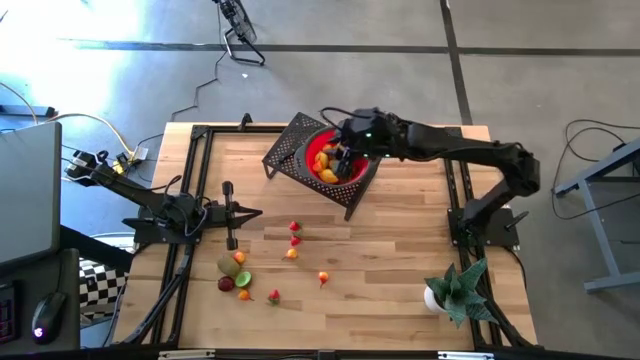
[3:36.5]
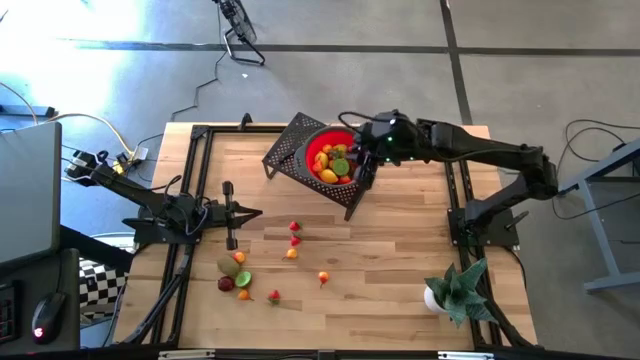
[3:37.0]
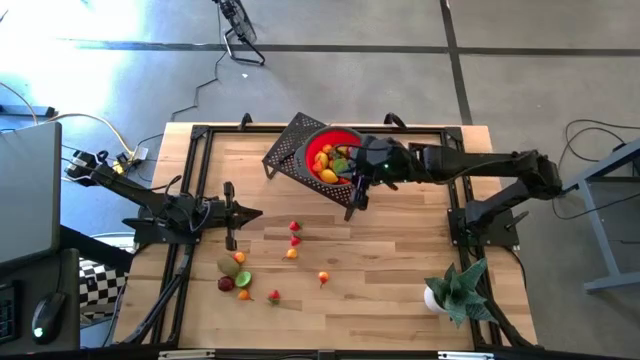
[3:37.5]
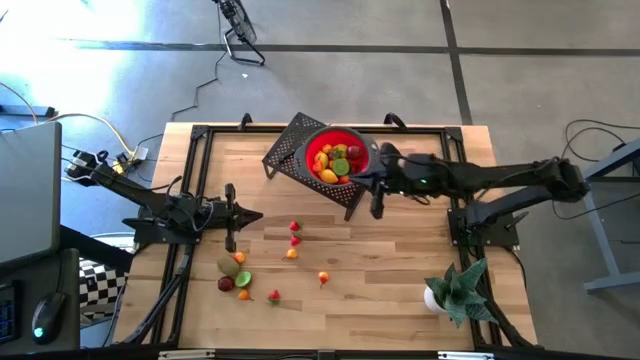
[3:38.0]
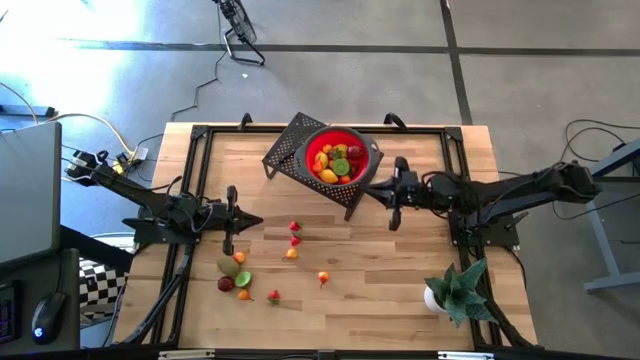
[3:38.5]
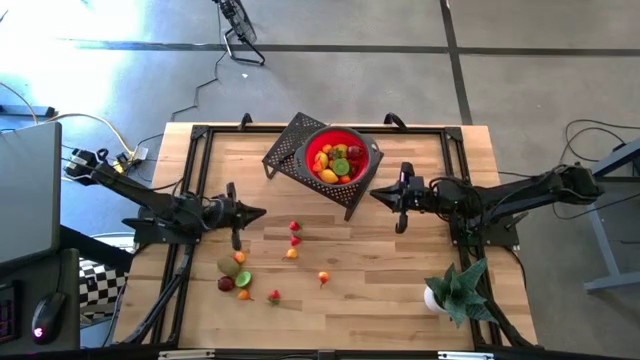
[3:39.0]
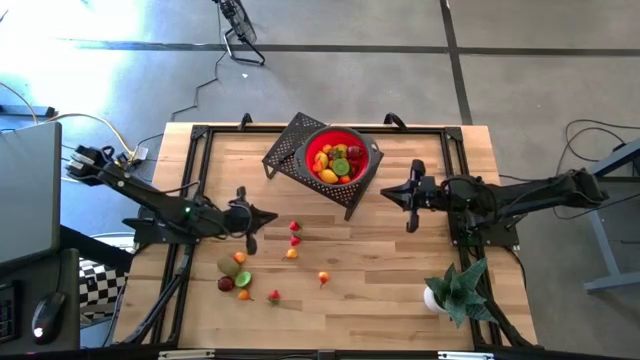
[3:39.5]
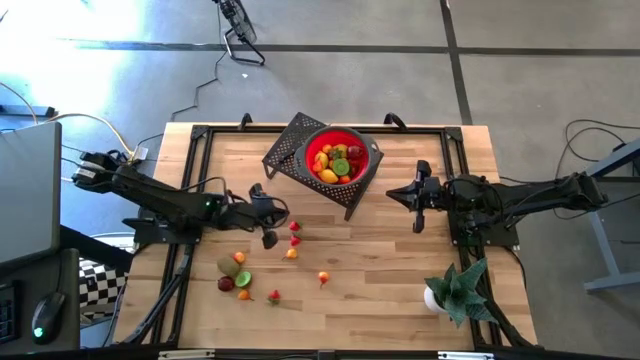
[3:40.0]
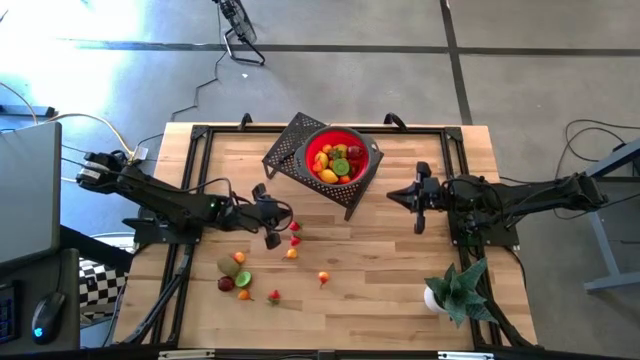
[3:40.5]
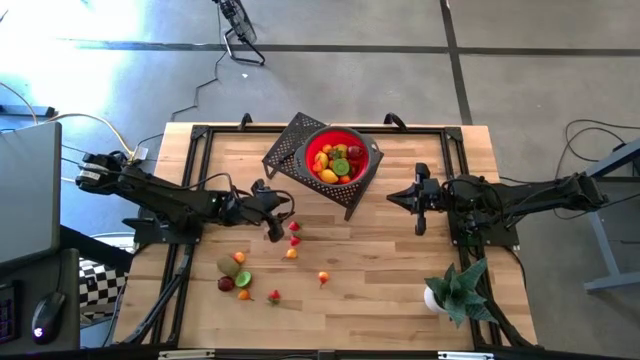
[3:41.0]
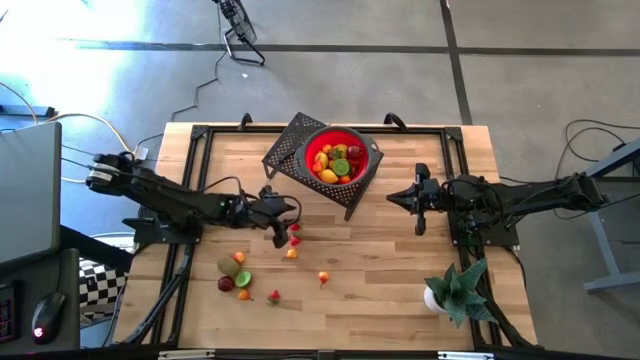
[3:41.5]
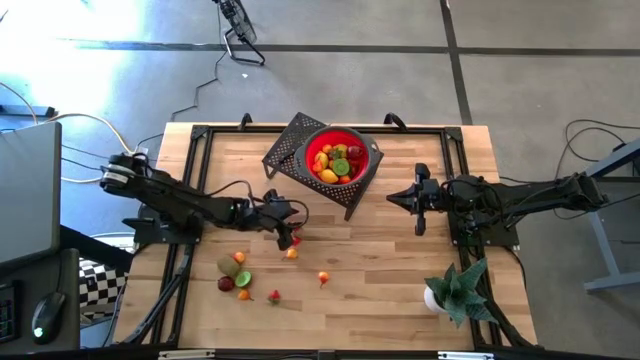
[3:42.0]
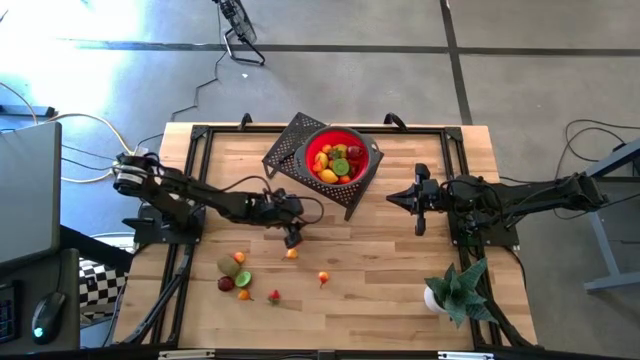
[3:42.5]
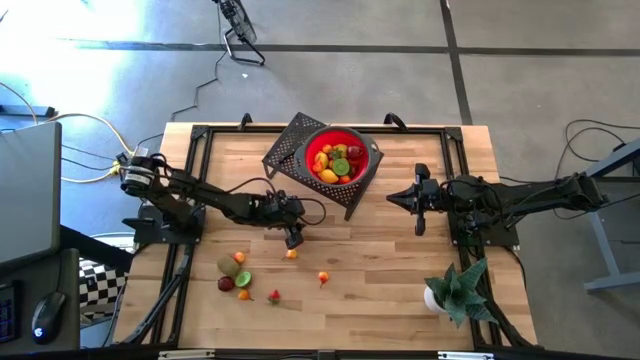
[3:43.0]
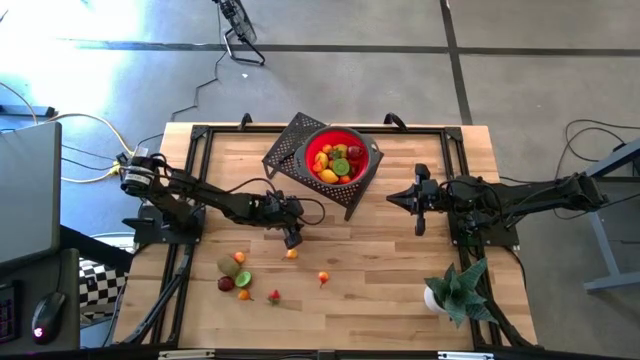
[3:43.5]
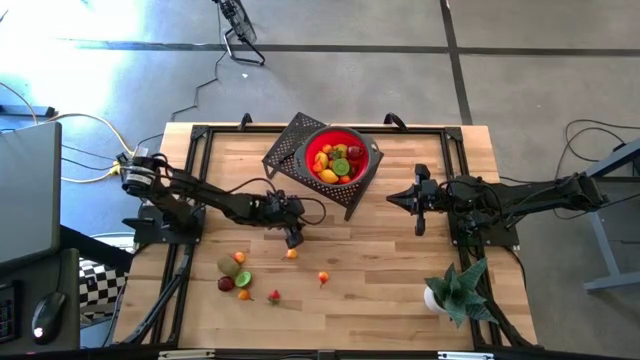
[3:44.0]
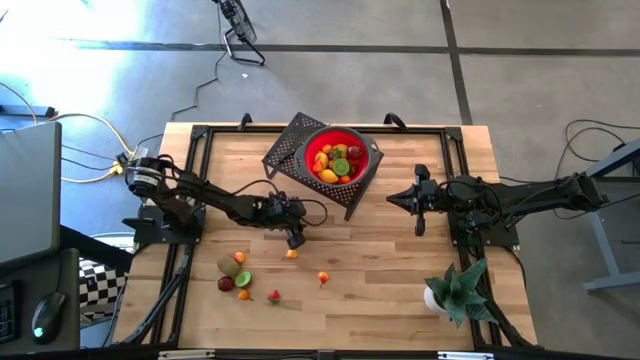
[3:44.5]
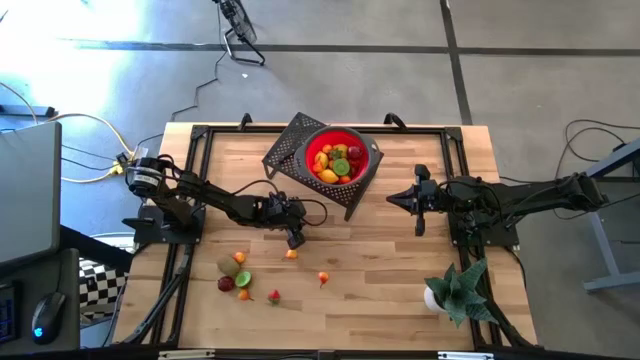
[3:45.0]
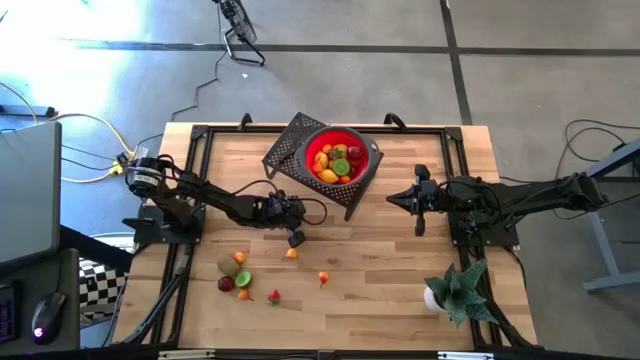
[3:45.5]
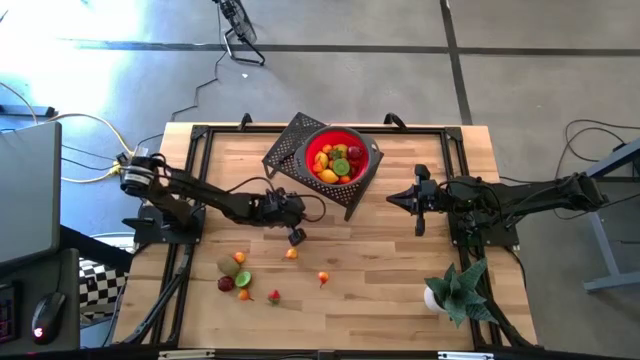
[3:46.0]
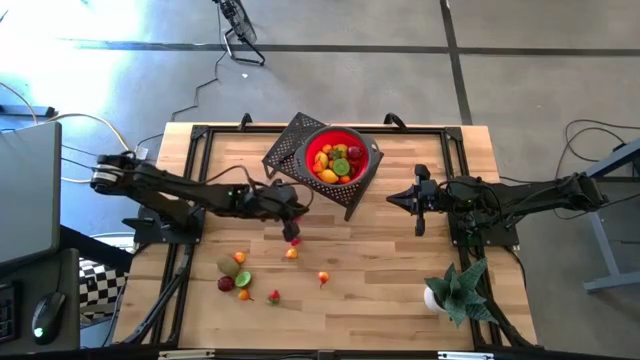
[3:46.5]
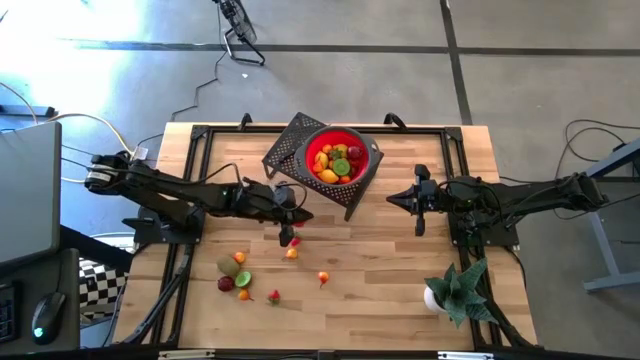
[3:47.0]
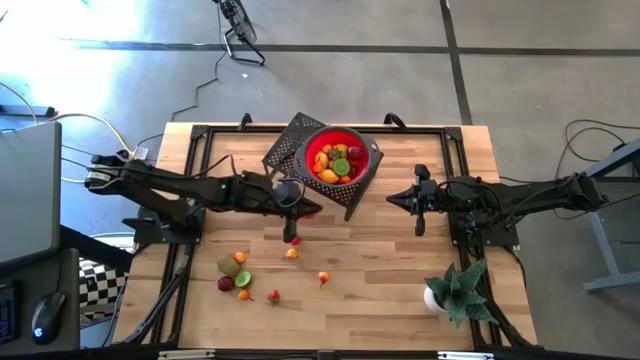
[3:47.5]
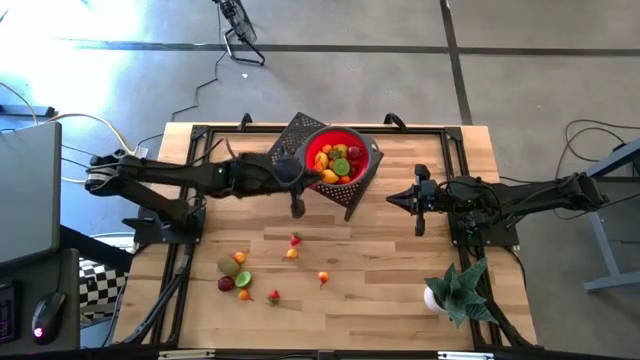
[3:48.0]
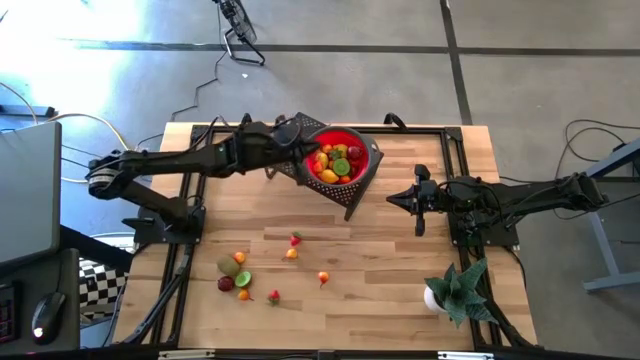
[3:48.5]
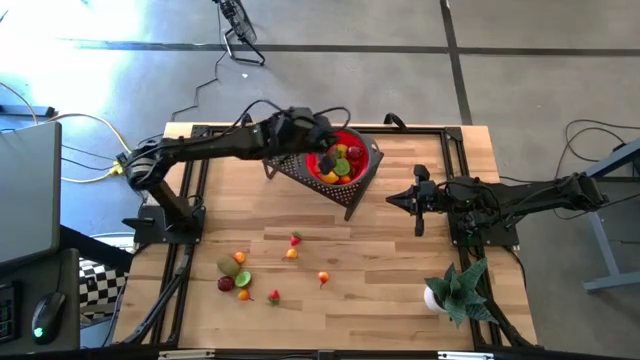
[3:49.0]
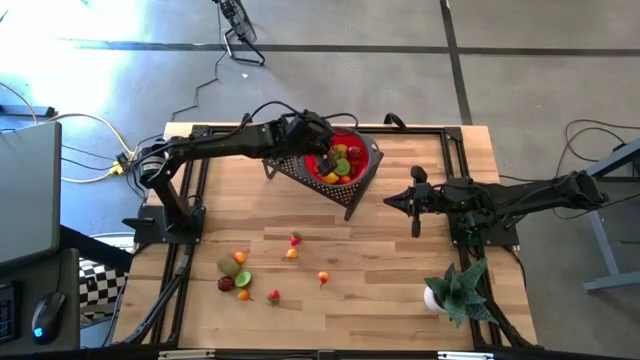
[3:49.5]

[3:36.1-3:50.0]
Task: Pick & Place Fruit
Put the strawberry into the strainer bowl on the shelf

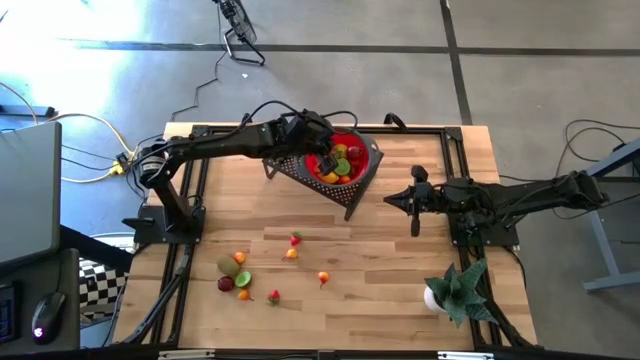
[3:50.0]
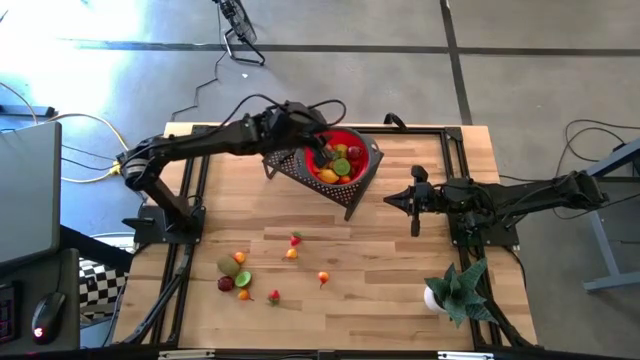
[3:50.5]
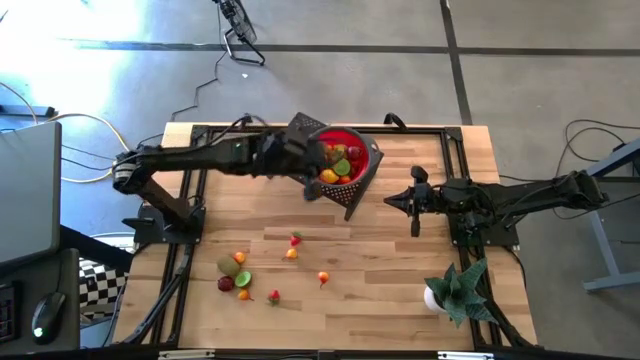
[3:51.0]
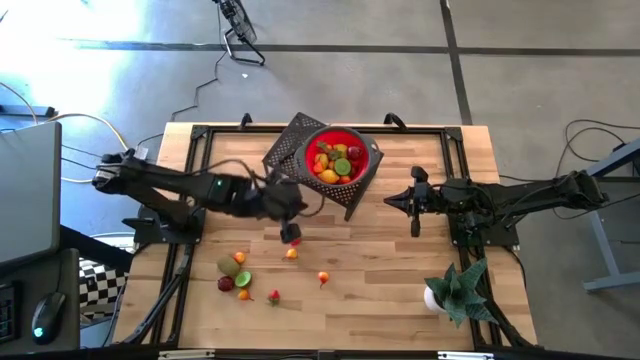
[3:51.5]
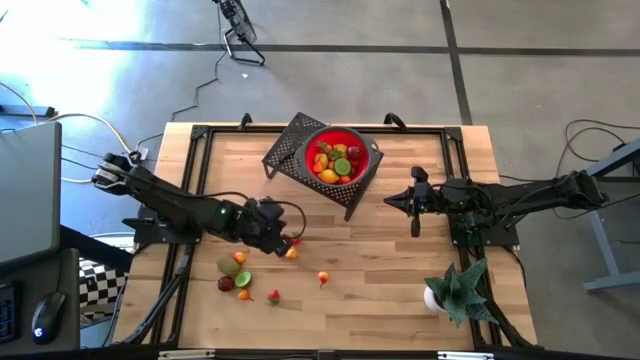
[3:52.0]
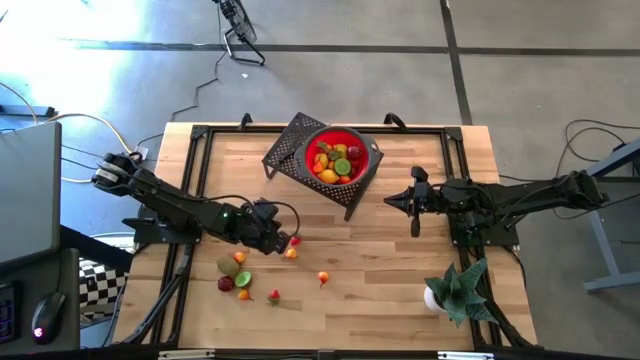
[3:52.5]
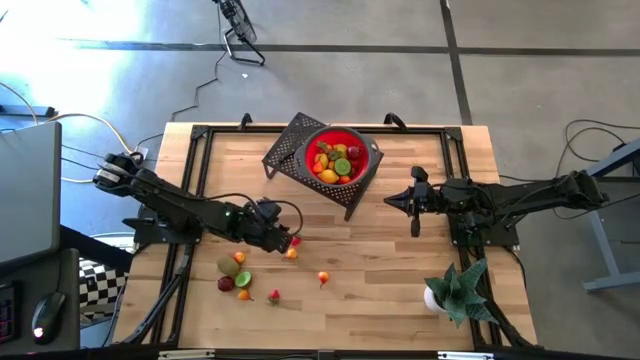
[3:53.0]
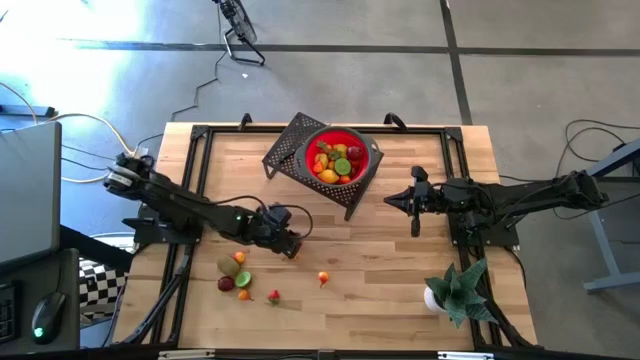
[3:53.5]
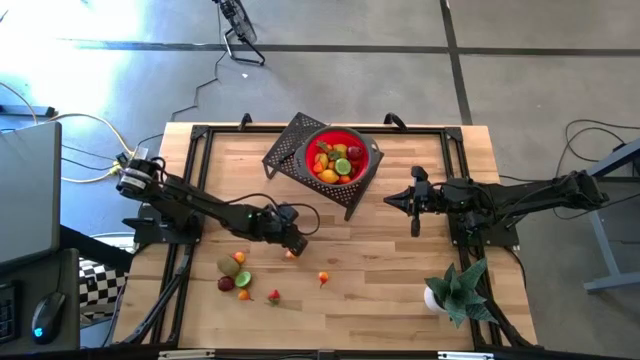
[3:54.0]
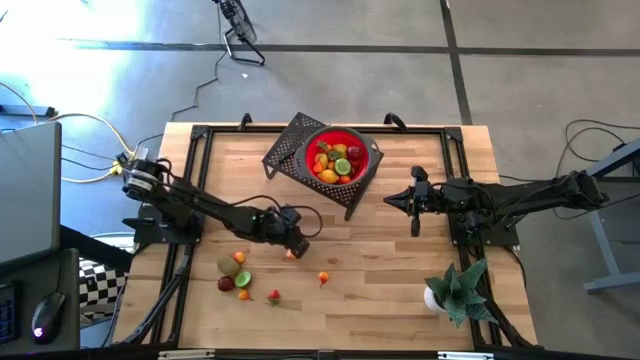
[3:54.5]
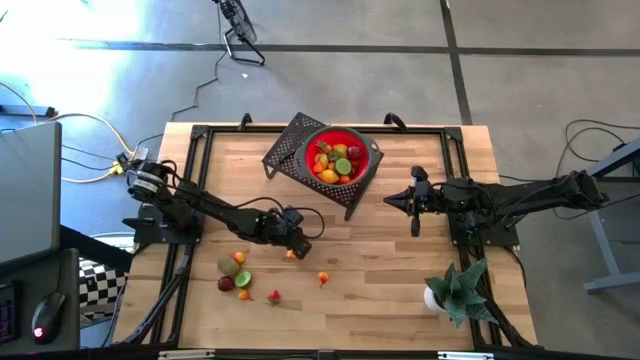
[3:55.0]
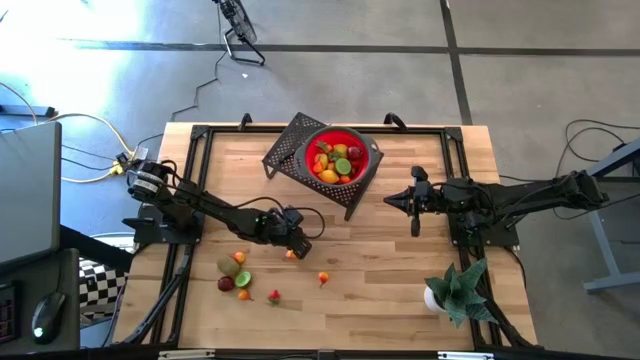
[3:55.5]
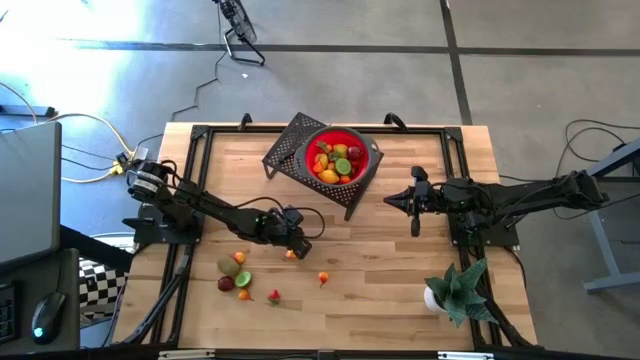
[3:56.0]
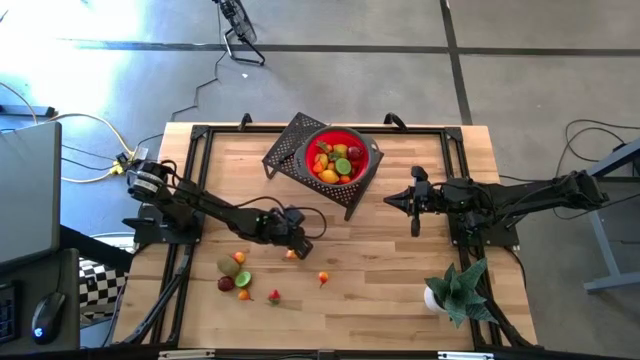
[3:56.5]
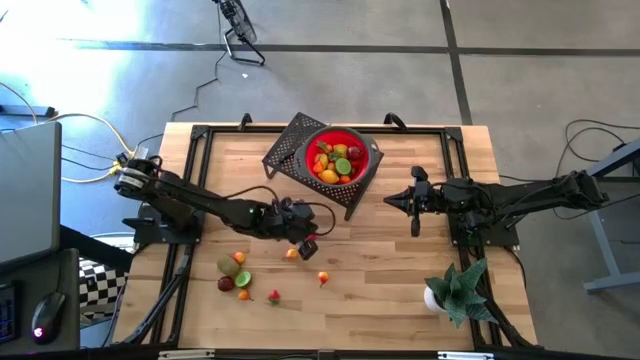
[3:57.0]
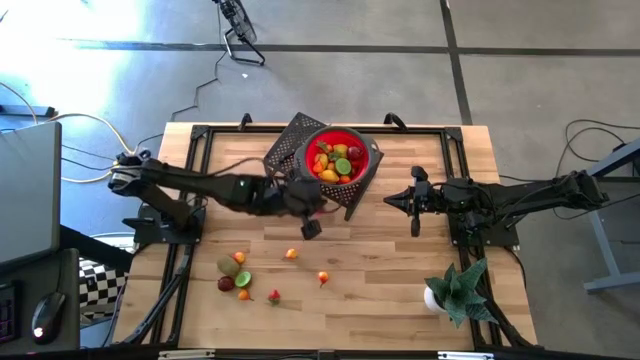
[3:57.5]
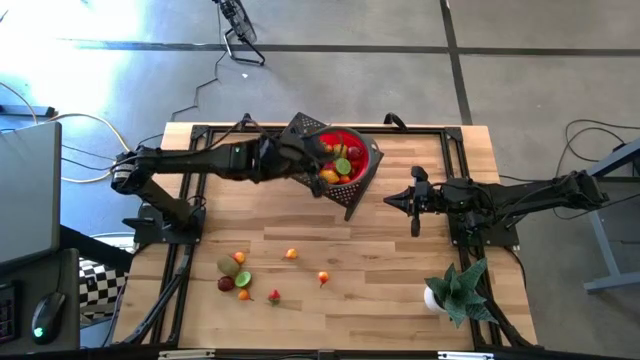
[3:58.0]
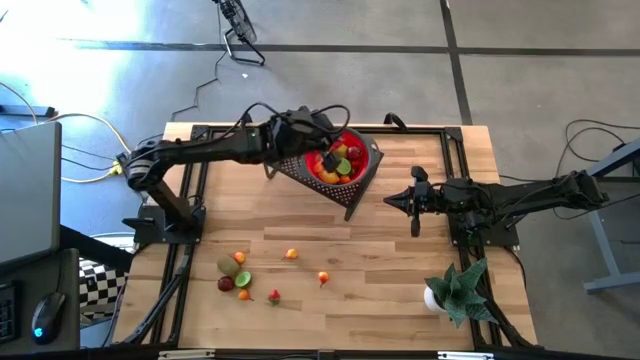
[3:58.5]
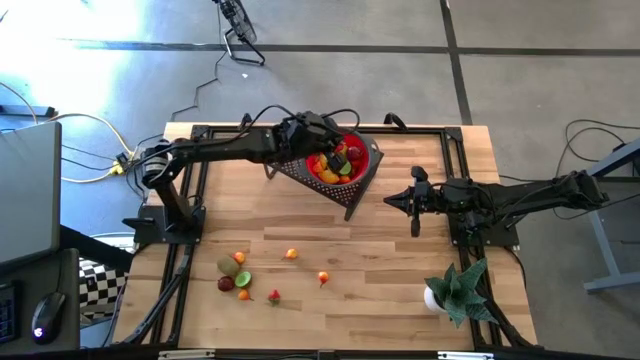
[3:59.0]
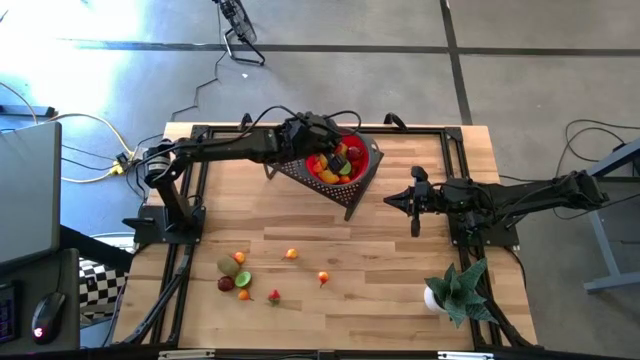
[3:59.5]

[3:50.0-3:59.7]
Put the strawberry into the strainer bowl on the shelf
